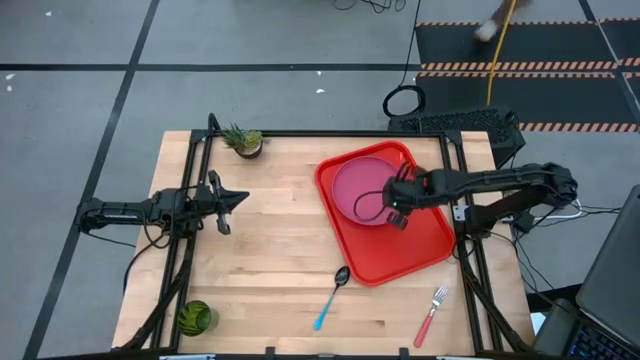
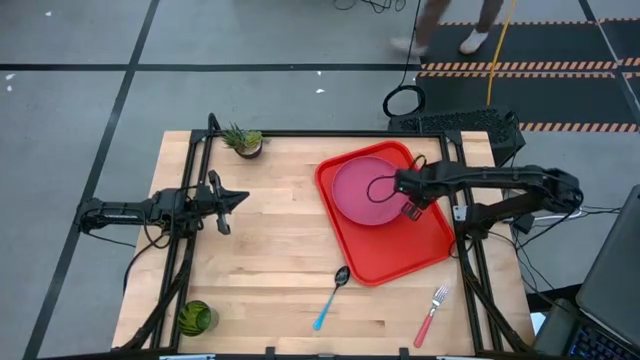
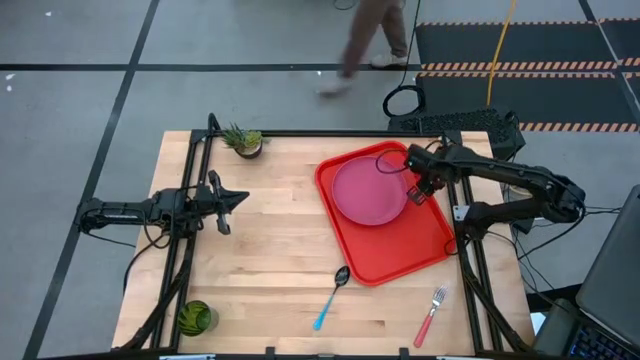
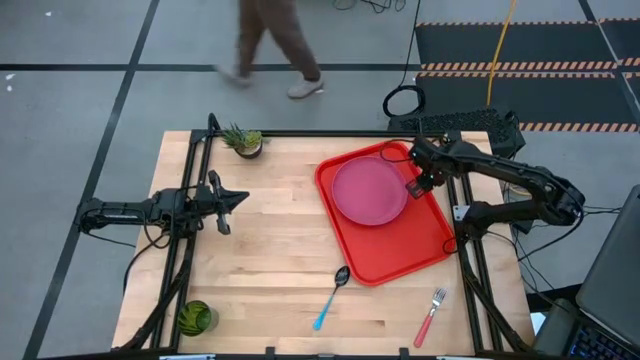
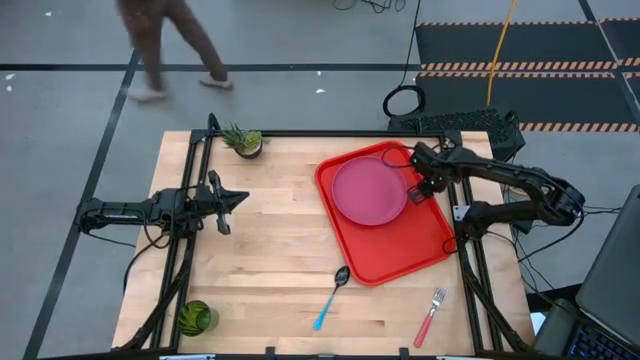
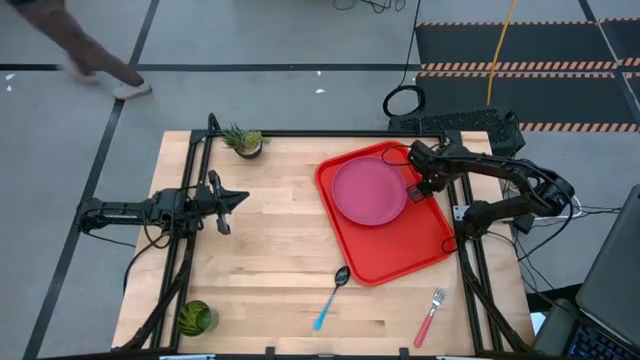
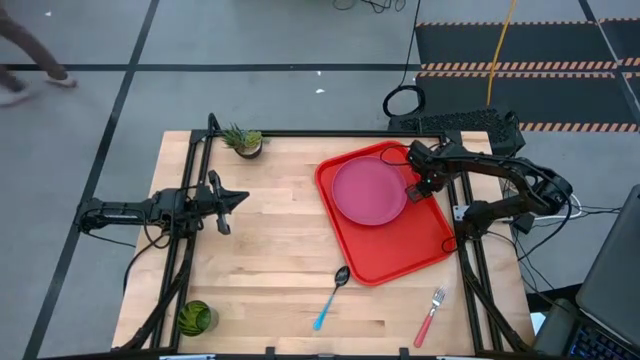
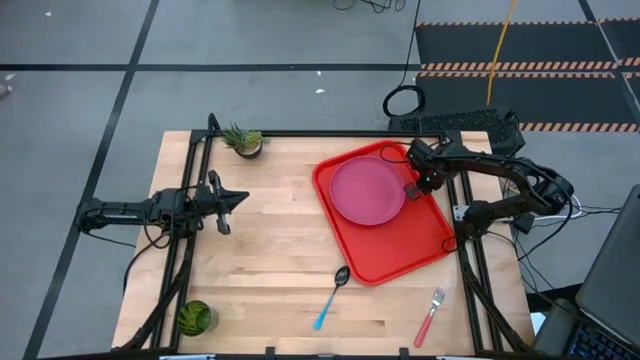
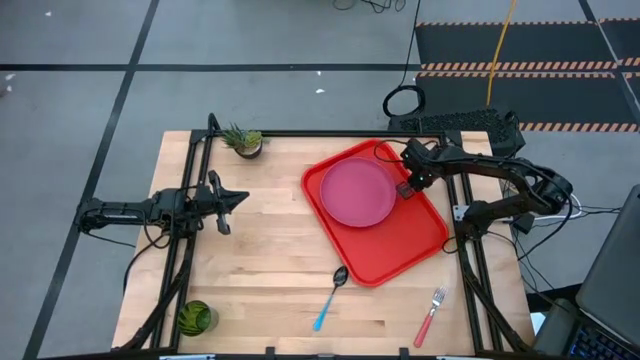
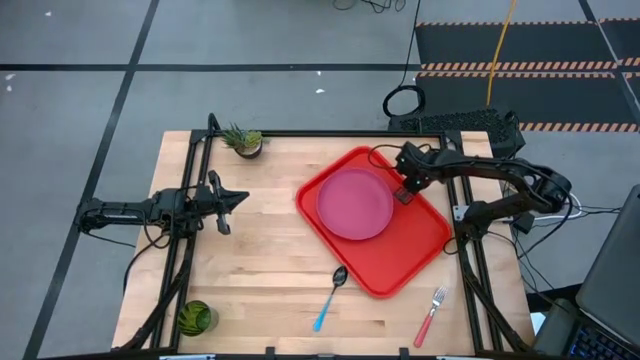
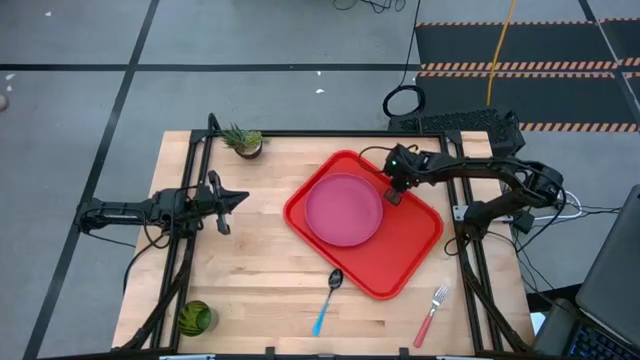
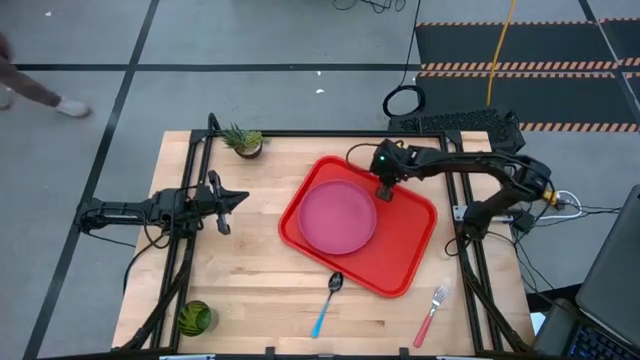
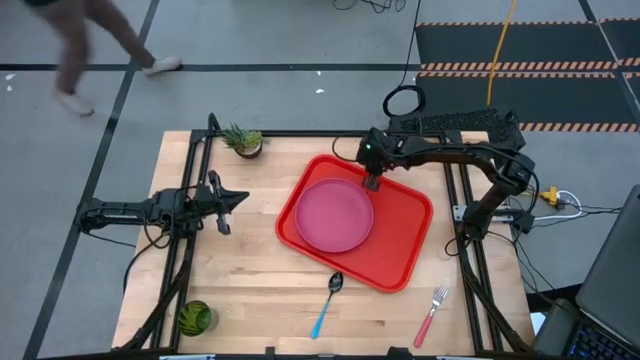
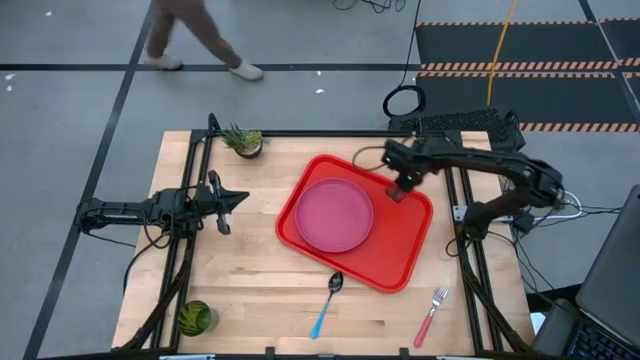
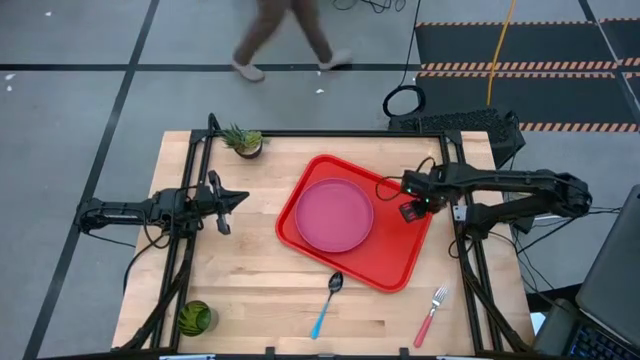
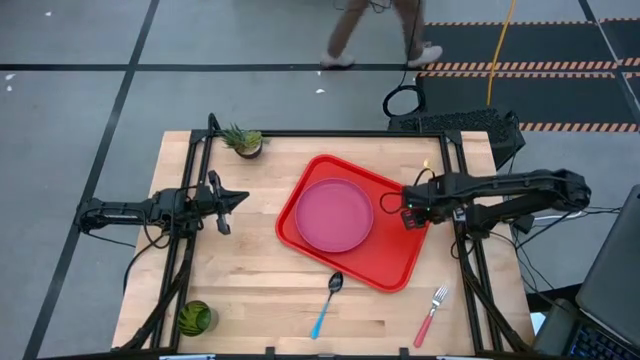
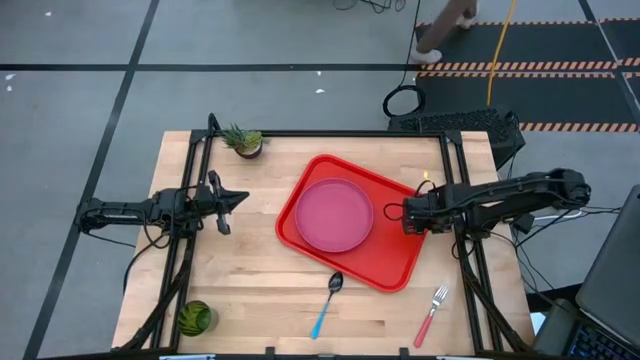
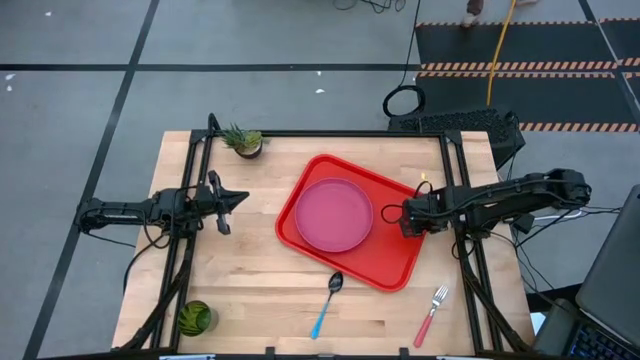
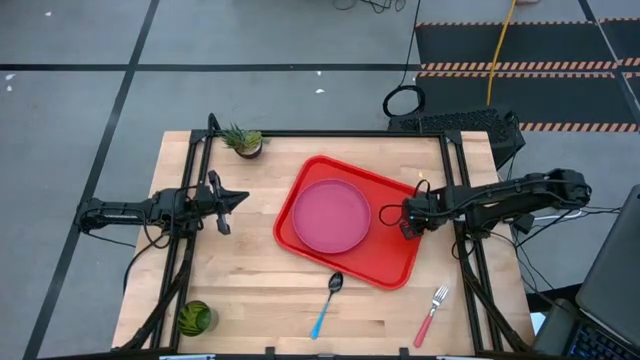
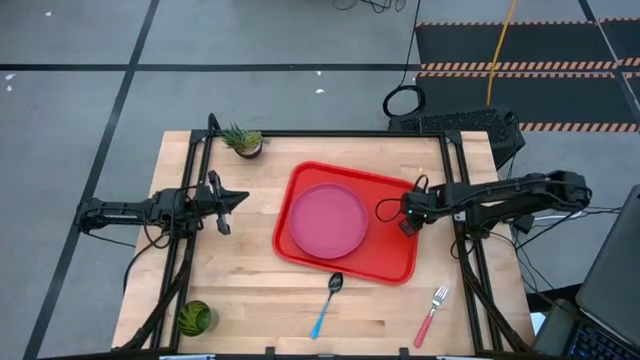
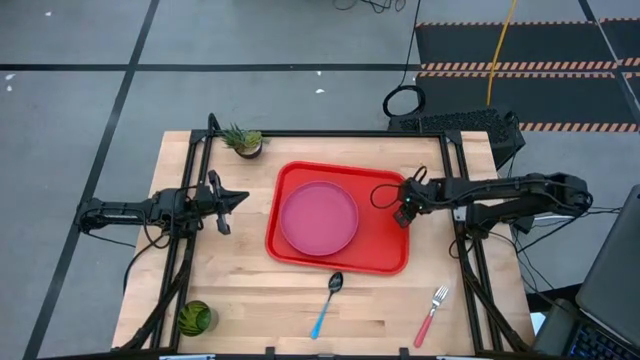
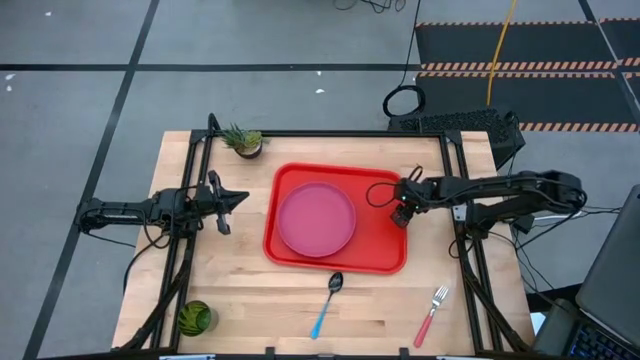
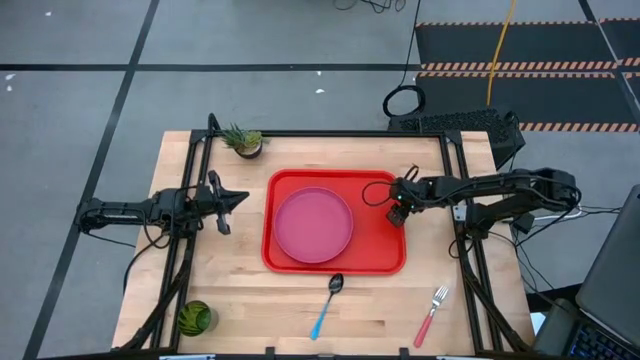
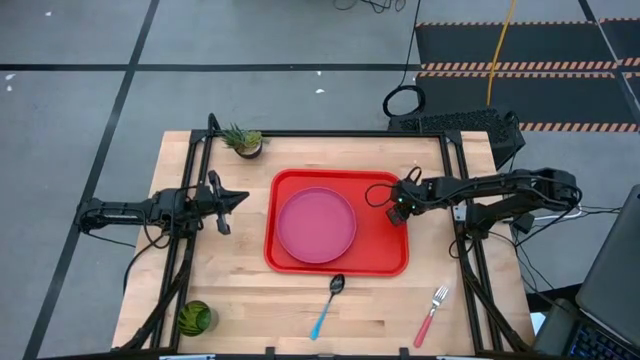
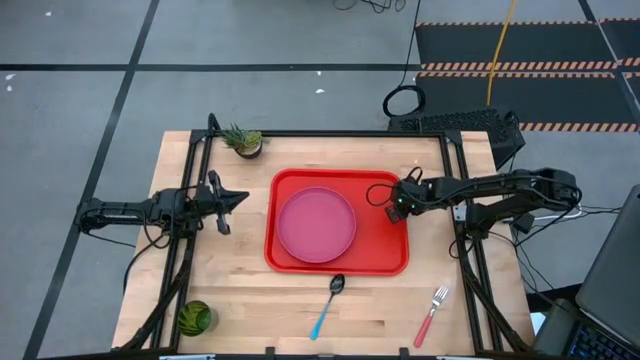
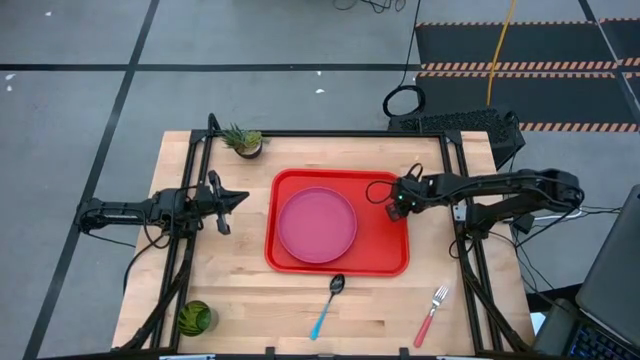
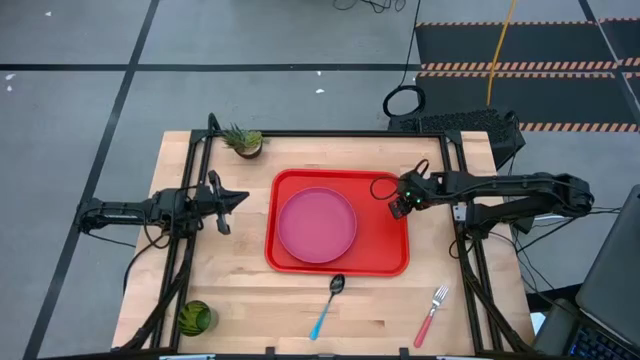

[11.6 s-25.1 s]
Task: Pick and place plate/cup/fork/spoon on tray
Adjust the orange tray

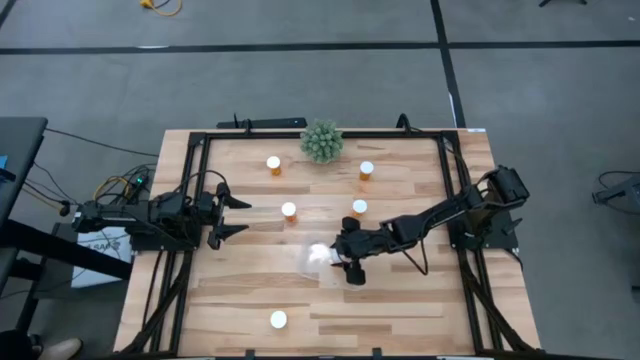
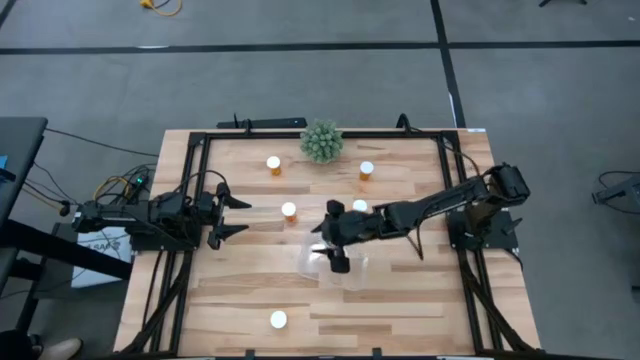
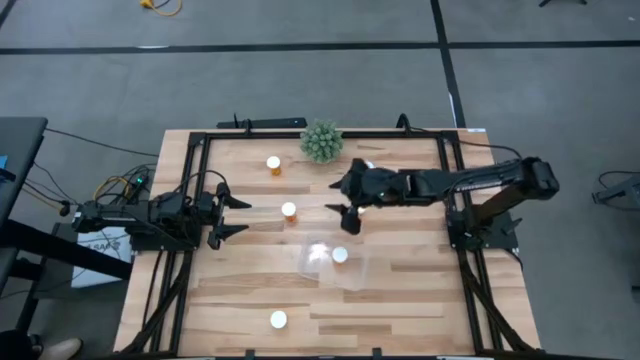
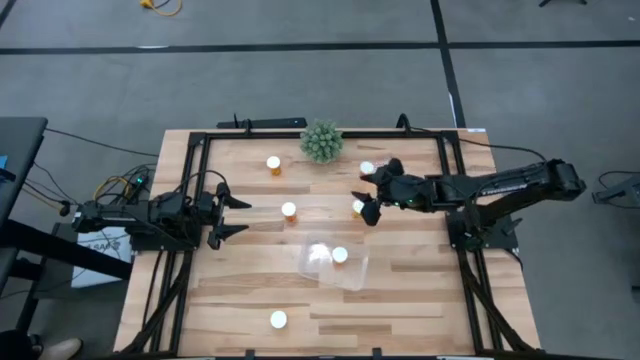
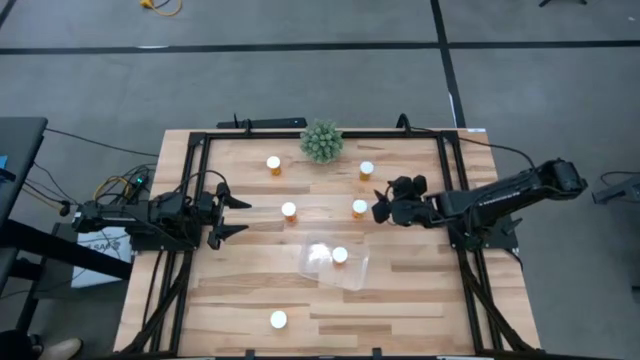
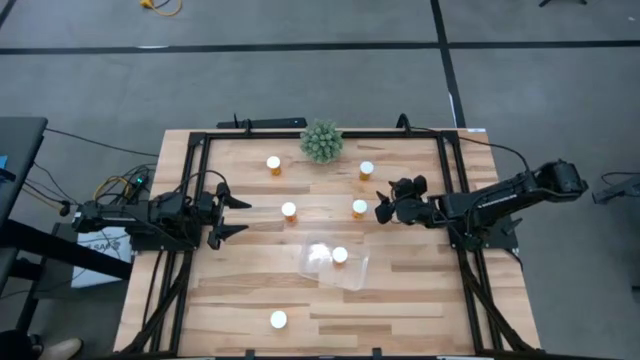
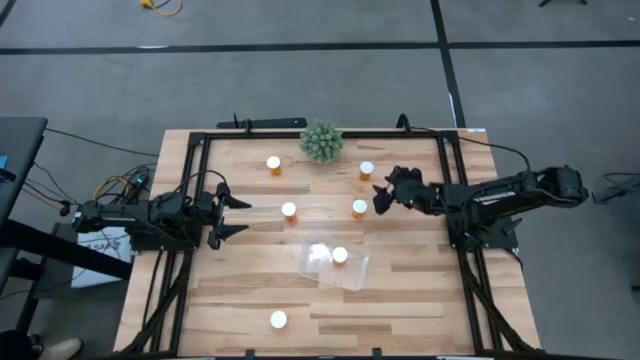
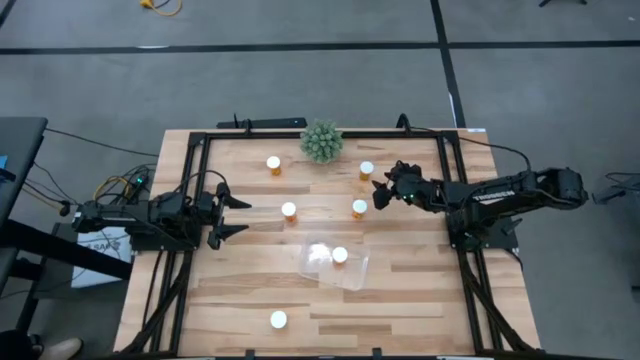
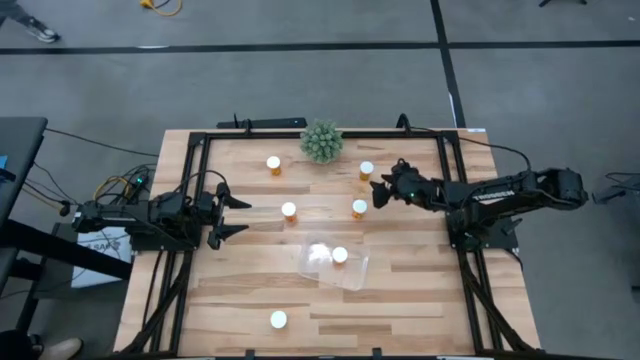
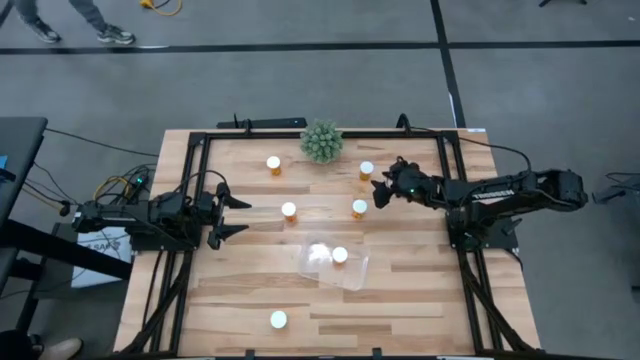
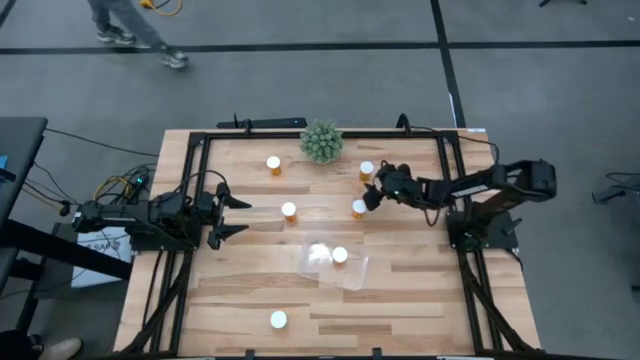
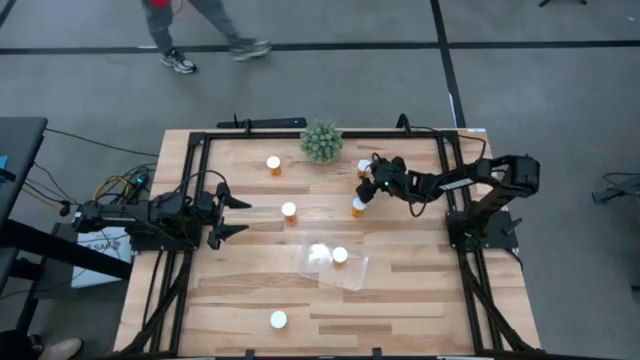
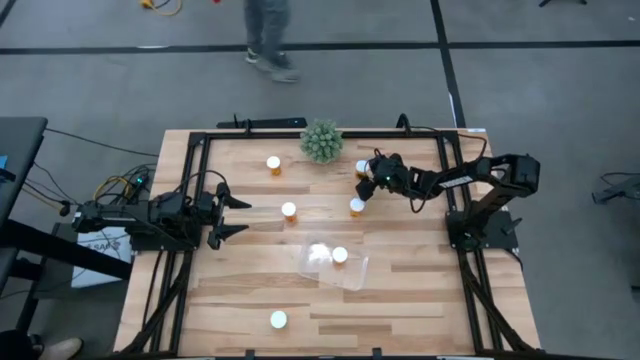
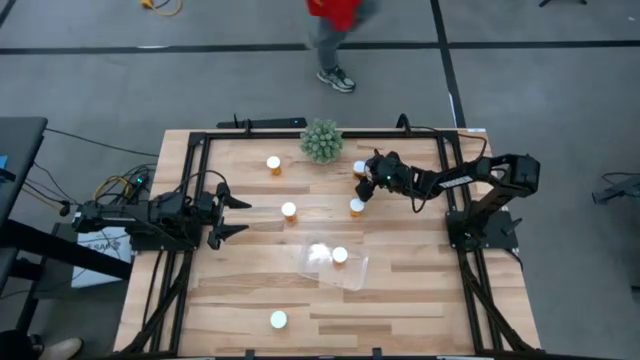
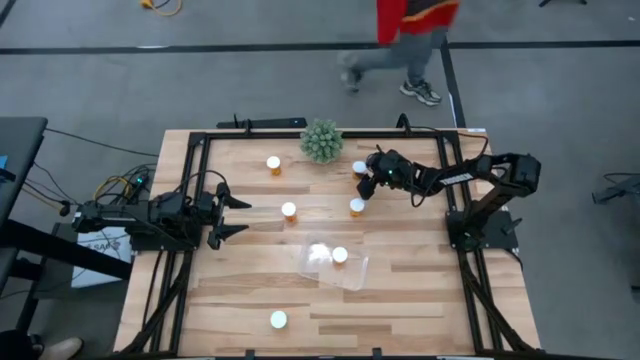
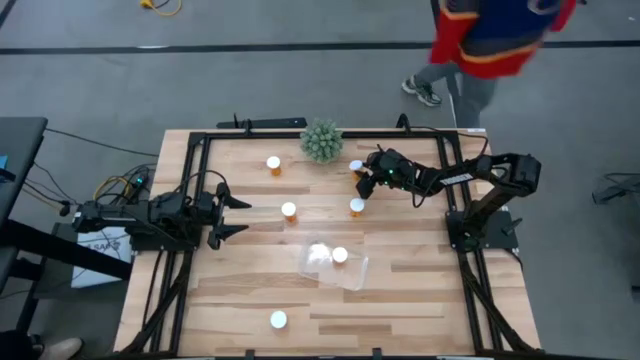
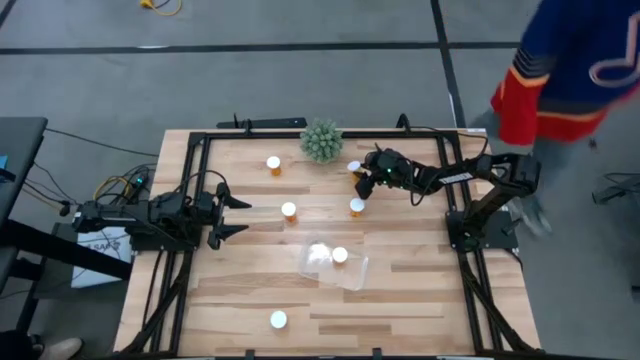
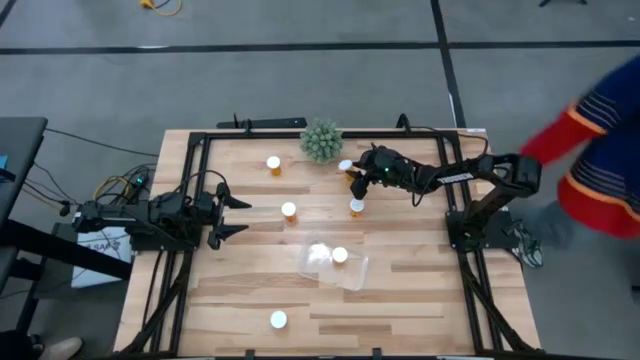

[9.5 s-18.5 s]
Task: Pick and place pill bottles into a basket
Put the orange pill bottle into the transparent bin
